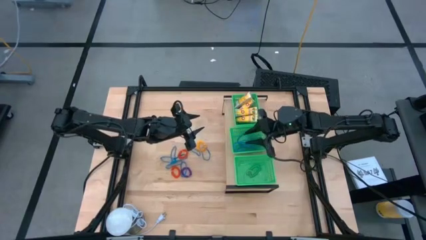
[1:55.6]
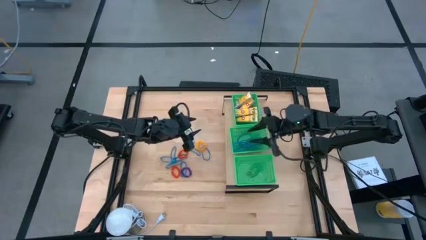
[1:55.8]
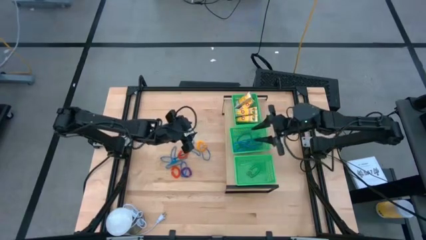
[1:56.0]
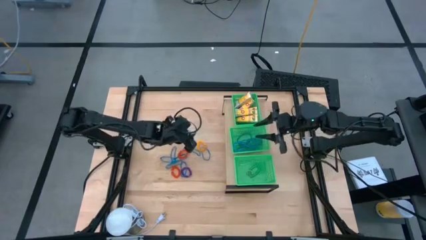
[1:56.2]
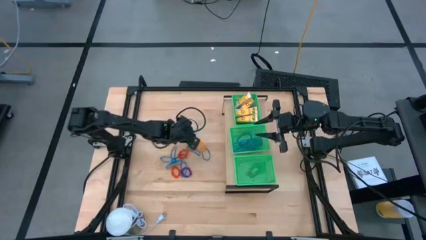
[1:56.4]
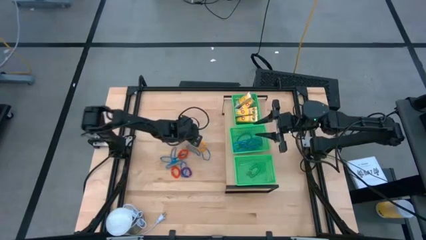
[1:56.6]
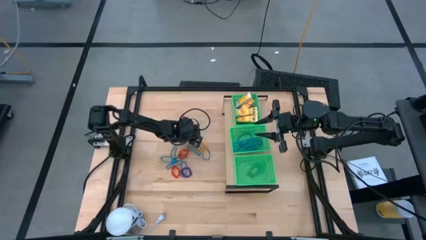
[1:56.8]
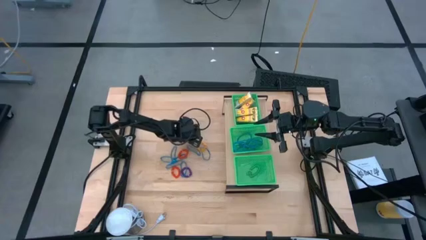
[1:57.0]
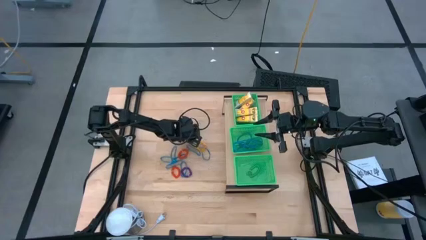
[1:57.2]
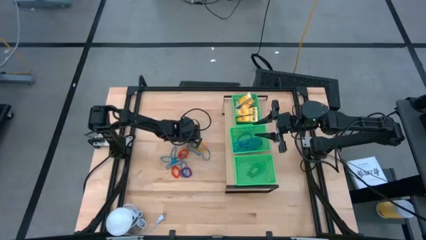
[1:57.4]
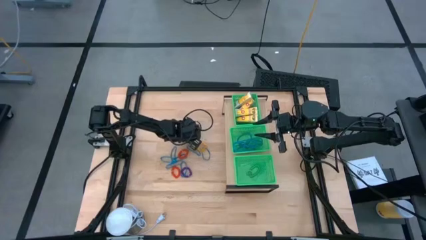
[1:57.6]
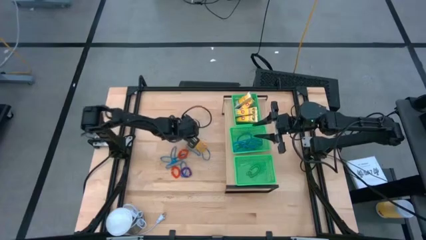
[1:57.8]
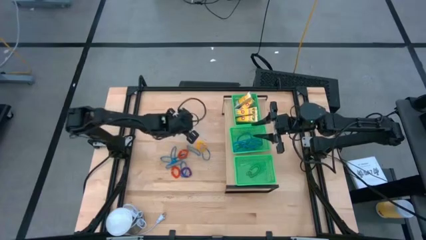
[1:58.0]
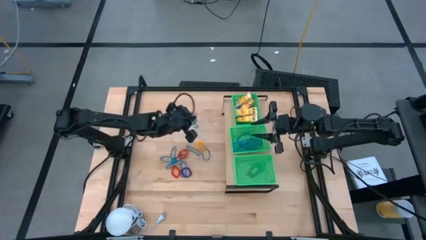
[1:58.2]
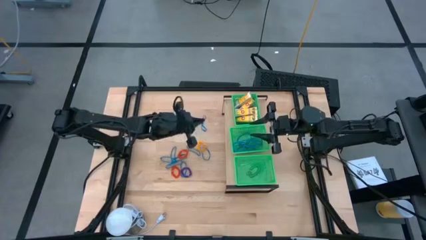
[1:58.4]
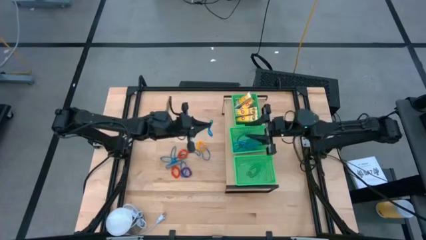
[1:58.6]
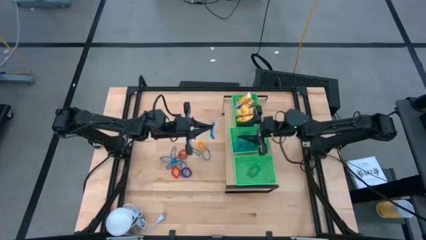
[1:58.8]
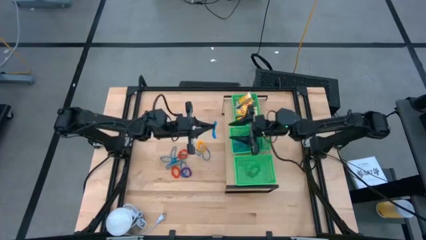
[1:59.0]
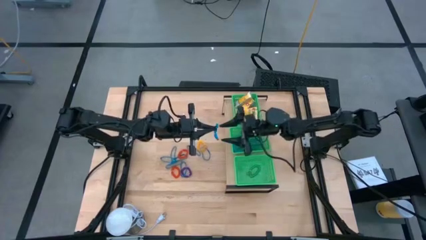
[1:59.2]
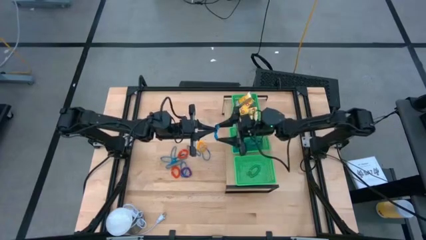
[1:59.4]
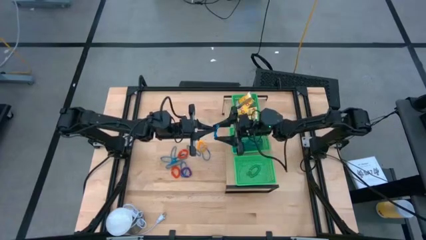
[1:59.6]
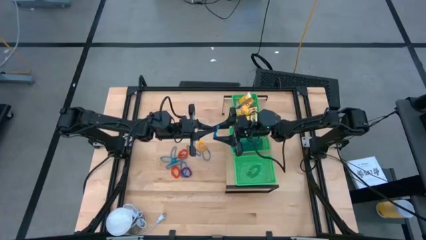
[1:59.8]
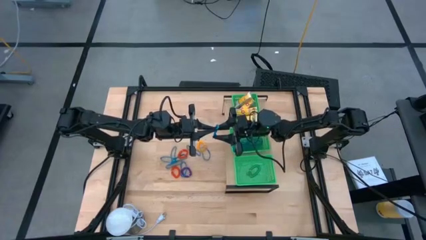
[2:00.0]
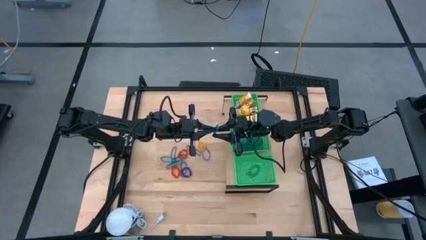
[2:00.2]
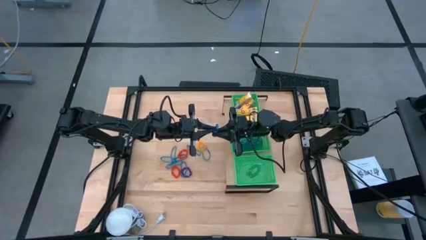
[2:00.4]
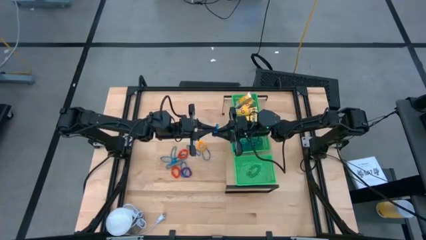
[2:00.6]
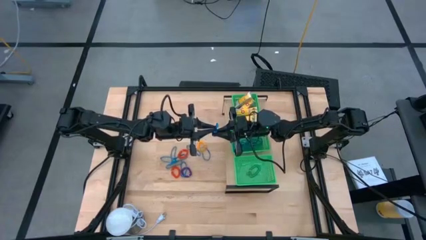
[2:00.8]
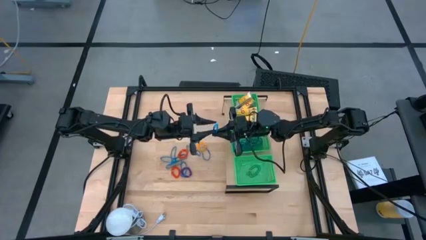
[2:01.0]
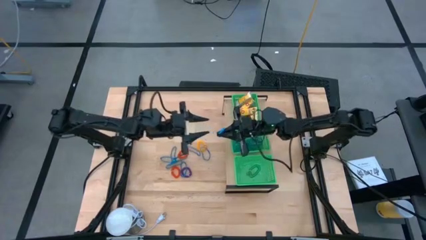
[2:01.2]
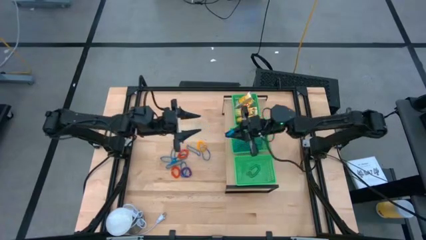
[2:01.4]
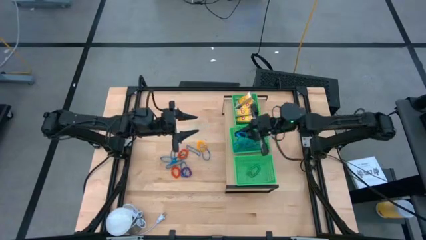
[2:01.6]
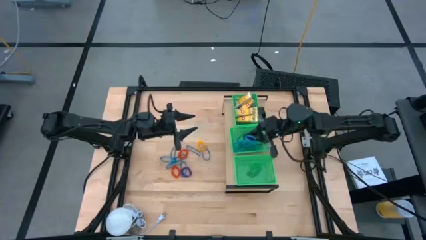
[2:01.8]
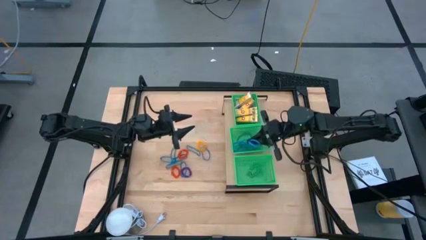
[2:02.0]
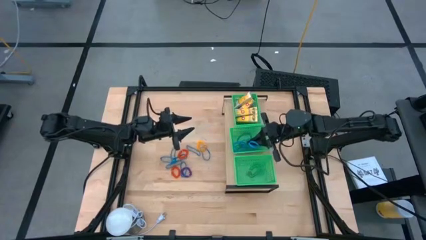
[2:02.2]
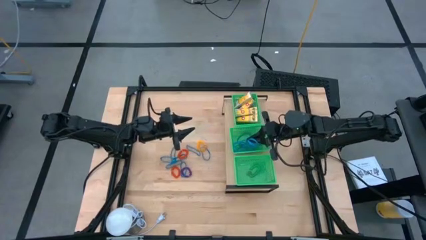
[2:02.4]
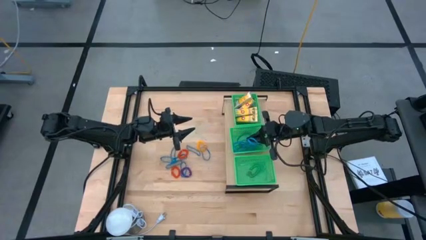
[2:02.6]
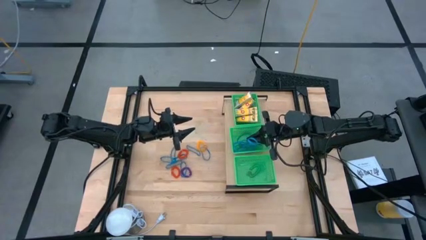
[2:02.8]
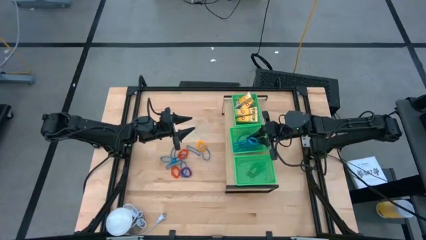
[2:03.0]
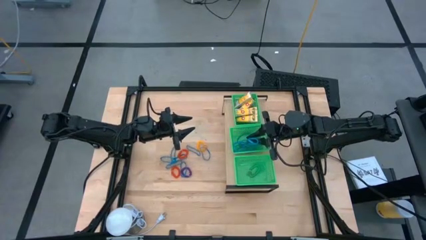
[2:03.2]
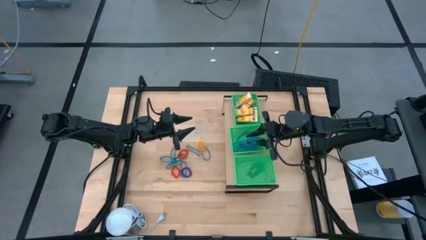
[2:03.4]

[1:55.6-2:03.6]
Task: Pick & Place Office Desk Supplies
Put the blue rubber band into the middle green bin

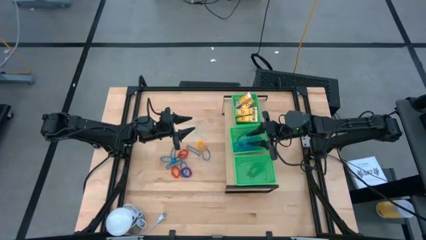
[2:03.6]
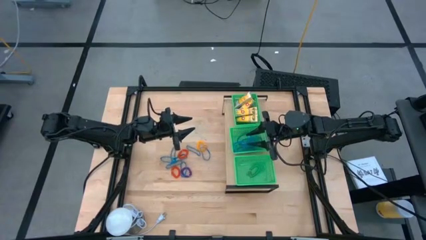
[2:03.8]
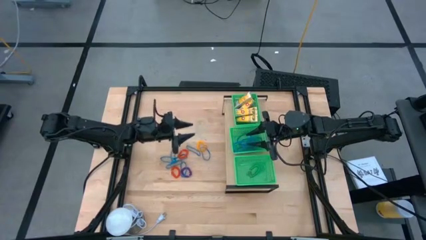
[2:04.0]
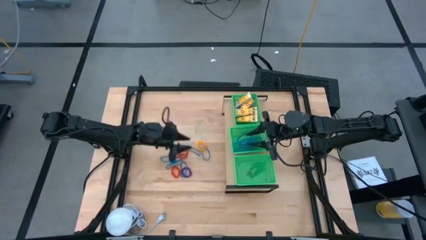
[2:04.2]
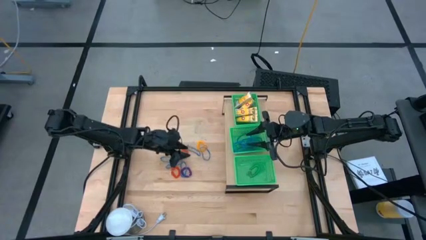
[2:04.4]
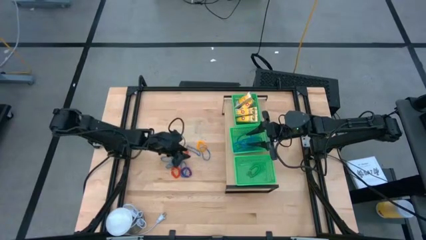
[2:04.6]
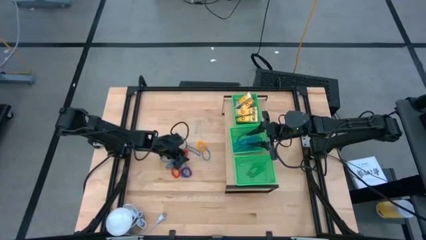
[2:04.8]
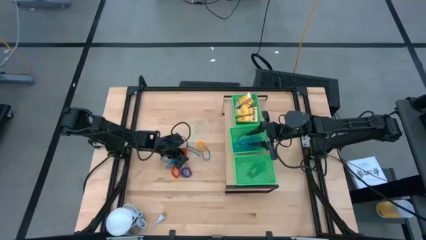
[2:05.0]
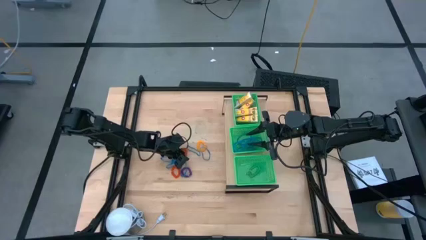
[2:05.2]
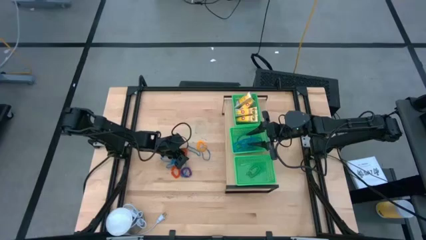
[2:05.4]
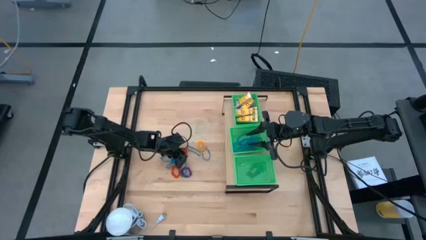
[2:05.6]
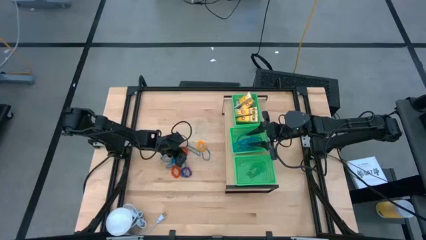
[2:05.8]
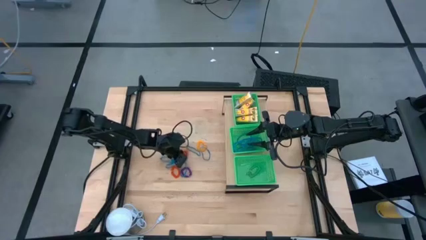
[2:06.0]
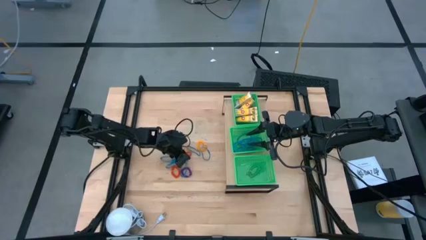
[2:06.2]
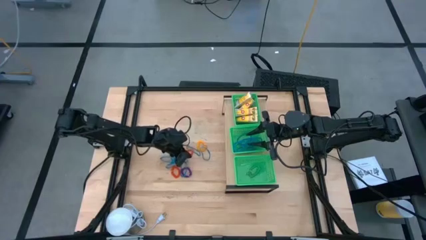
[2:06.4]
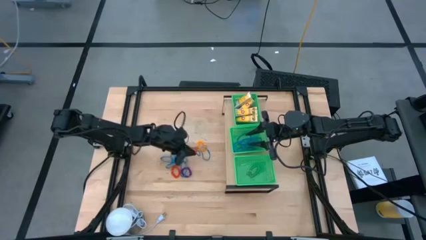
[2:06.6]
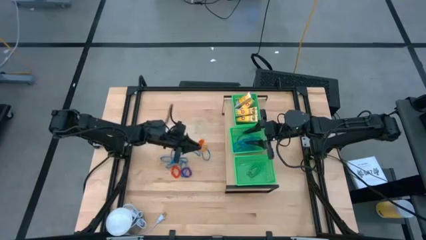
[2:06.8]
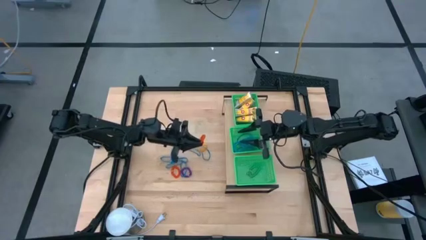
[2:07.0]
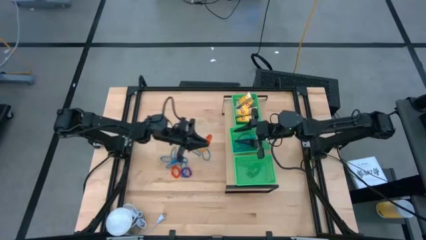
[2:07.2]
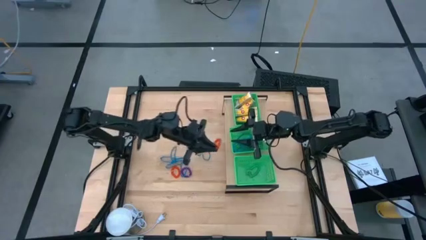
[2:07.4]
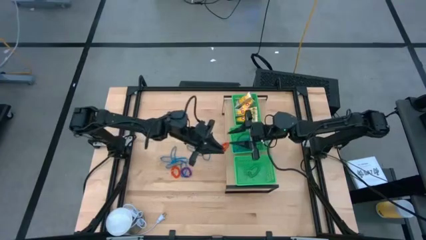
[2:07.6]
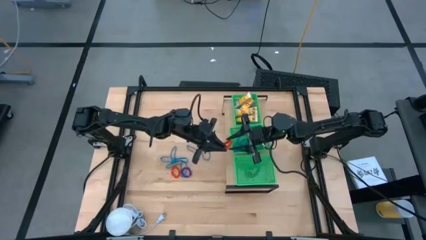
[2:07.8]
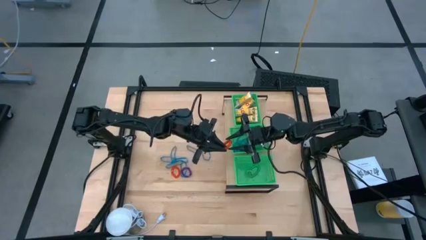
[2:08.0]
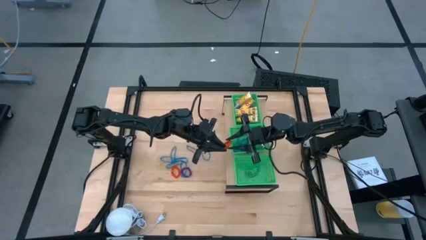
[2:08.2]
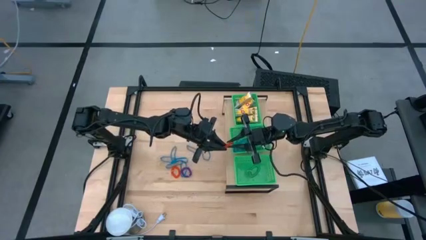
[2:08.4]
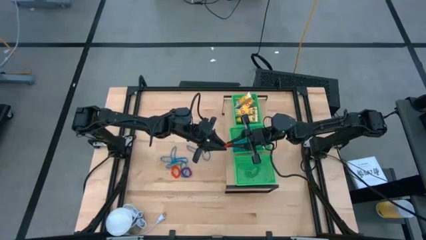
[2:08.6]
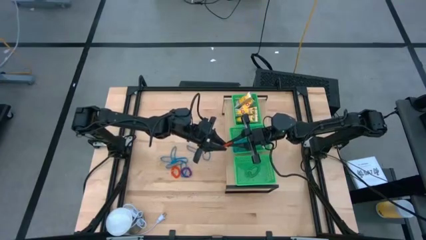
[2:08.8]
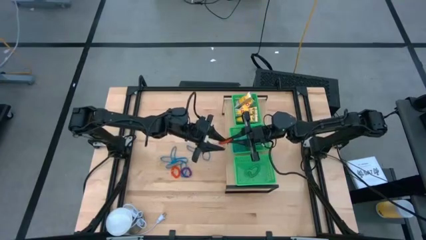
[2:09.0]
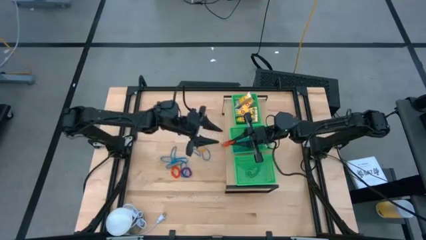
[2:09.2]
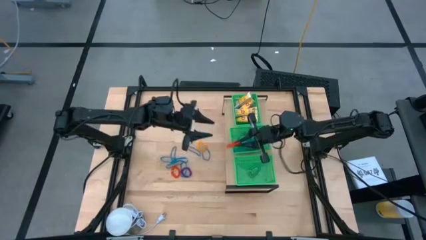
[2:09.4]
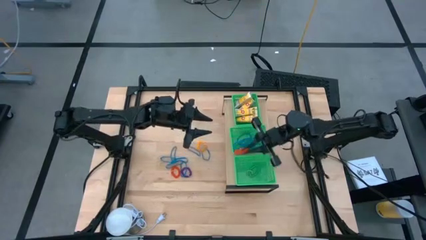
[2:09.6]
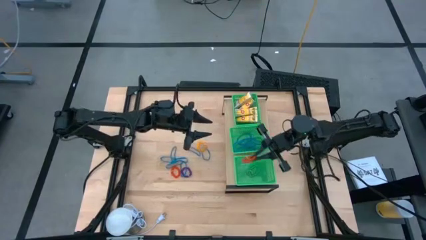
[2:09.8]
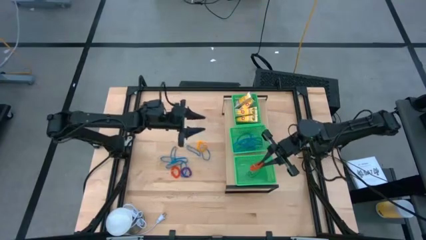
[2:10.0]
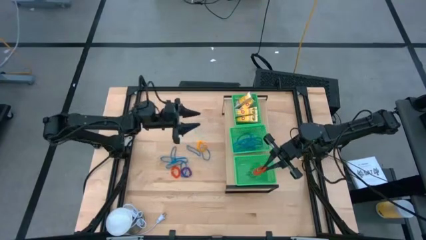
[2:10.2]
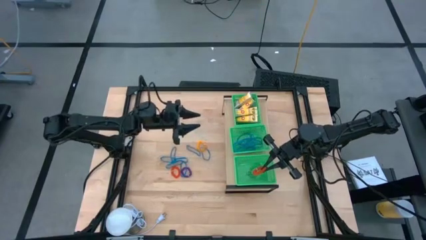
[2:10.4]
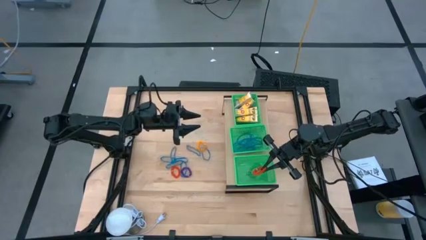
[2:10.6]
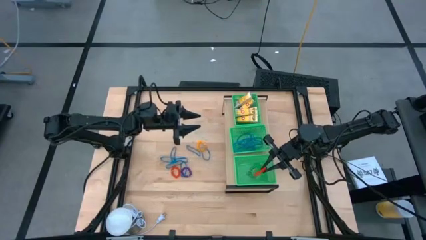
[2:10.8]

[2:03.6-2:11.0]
Put the orange spring keychain into the bottom green bin
